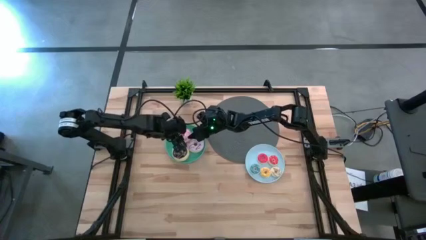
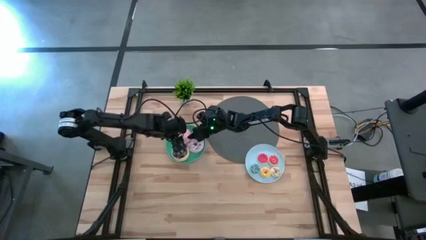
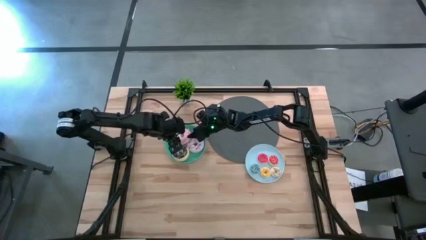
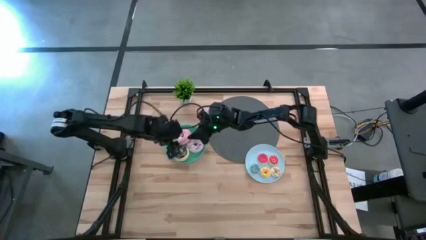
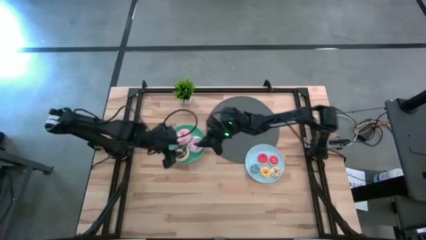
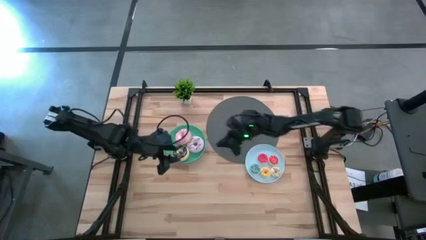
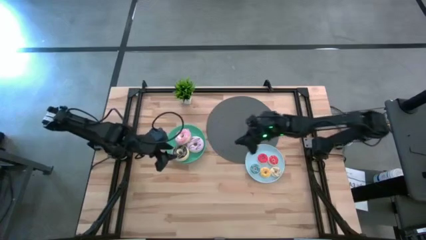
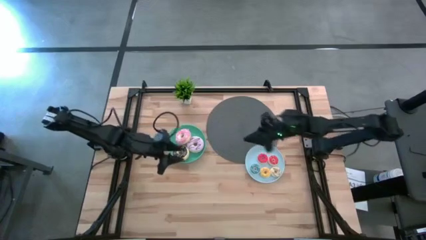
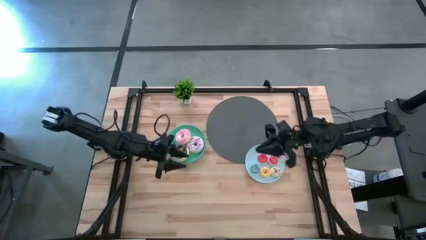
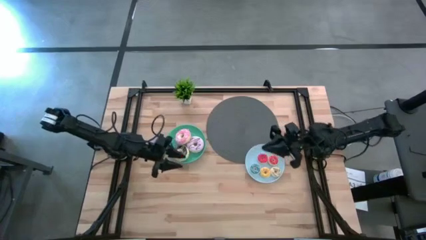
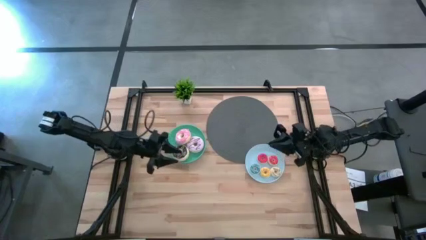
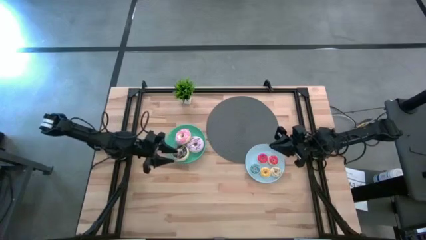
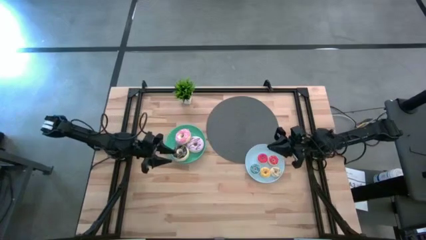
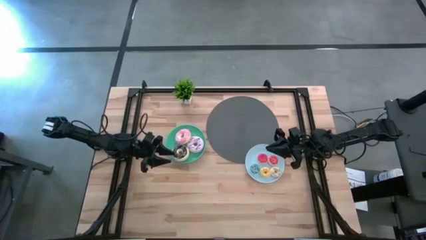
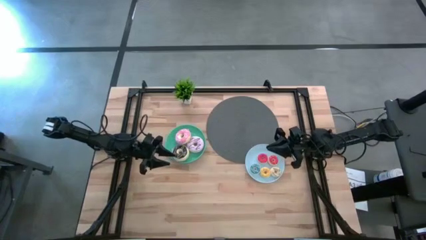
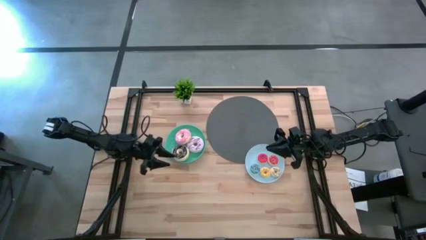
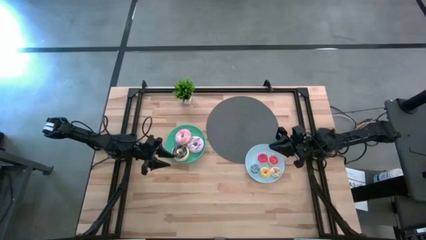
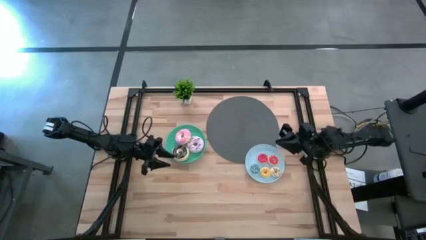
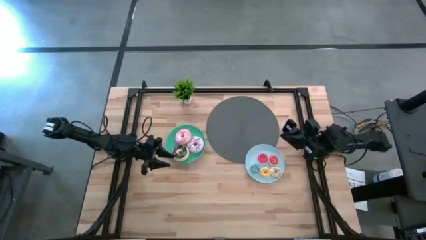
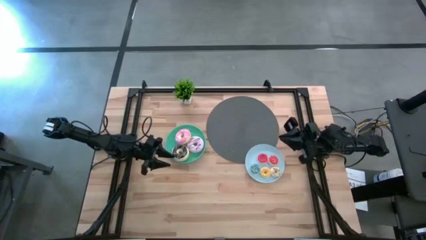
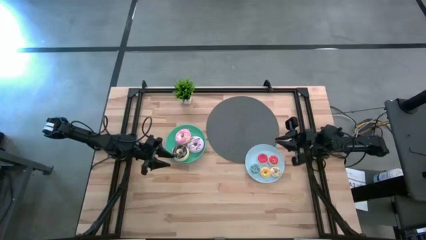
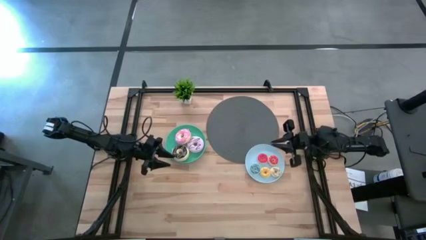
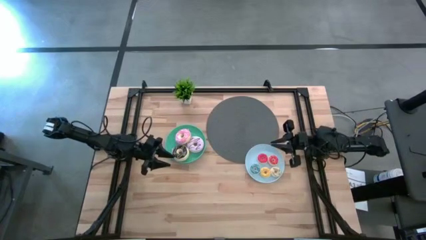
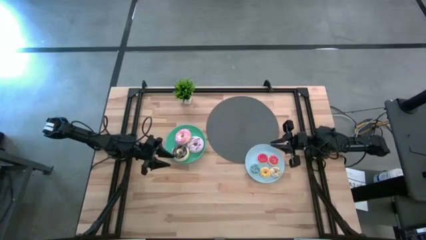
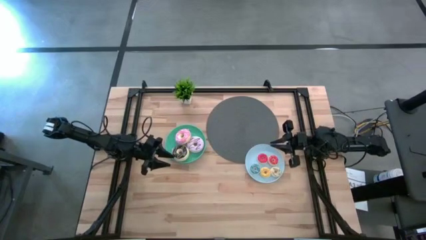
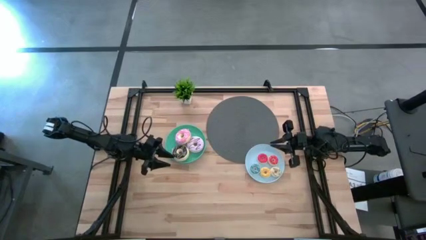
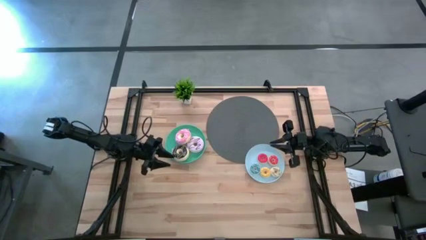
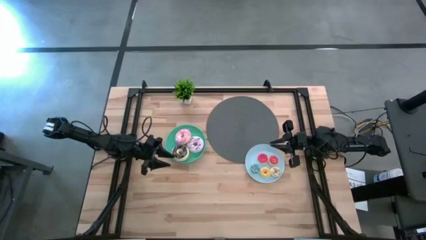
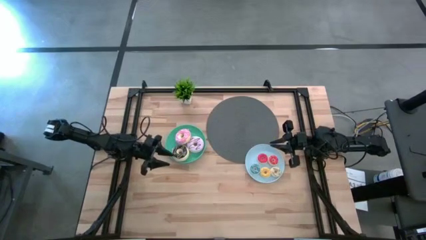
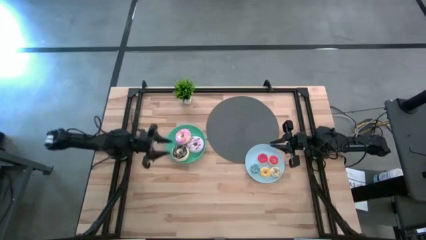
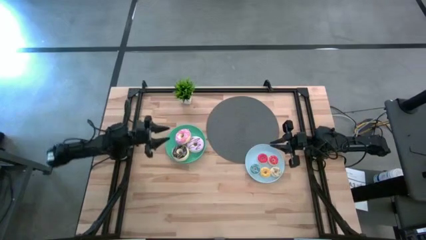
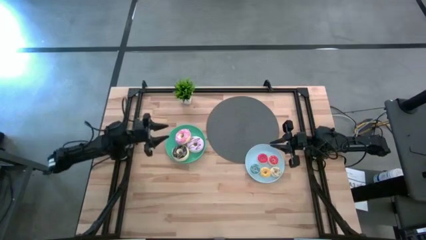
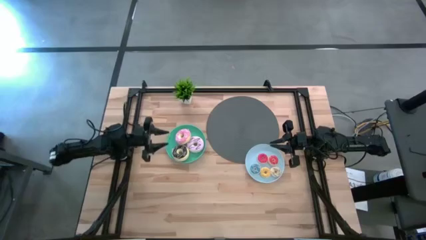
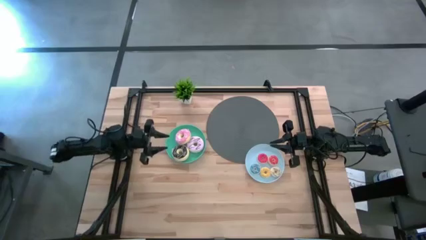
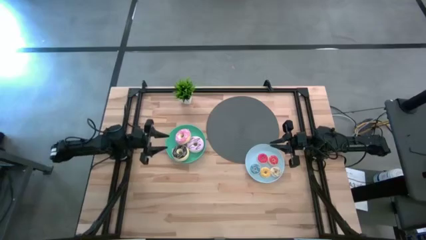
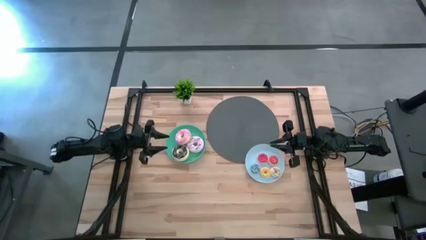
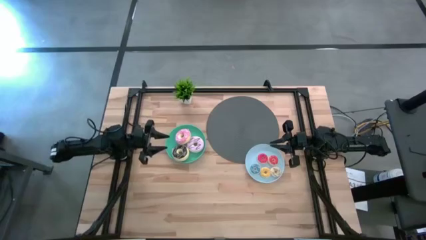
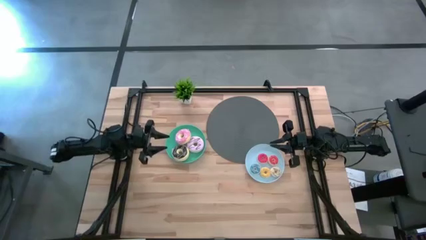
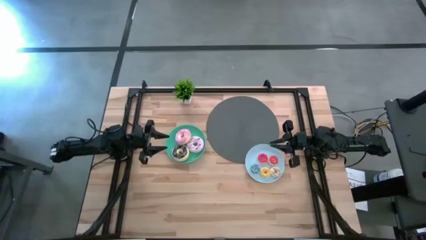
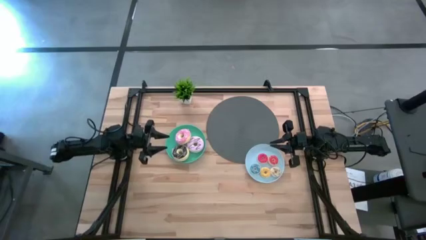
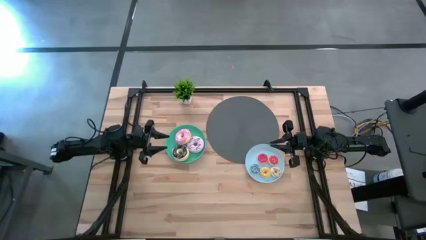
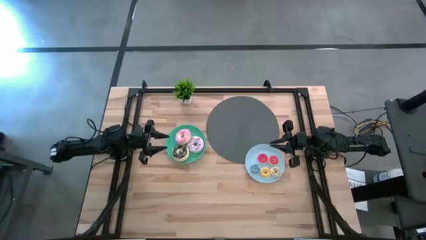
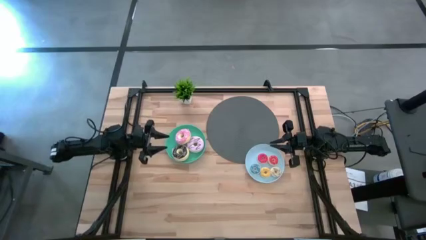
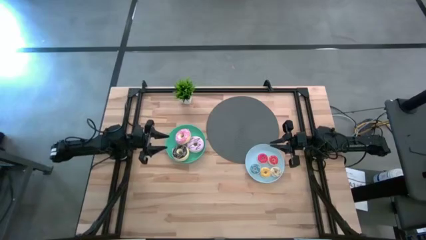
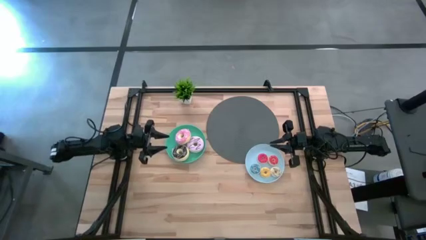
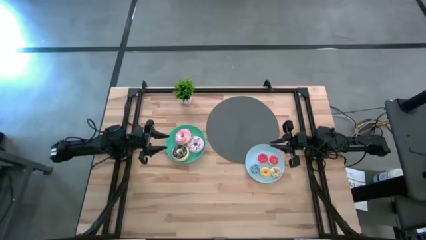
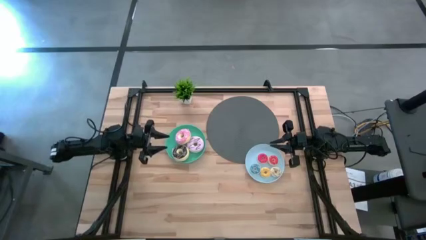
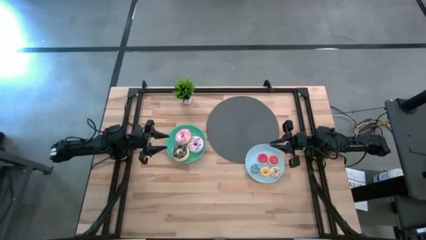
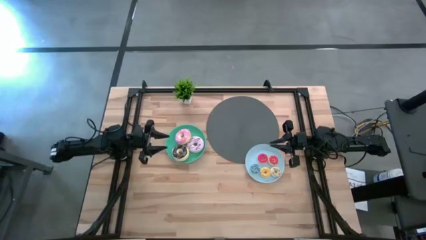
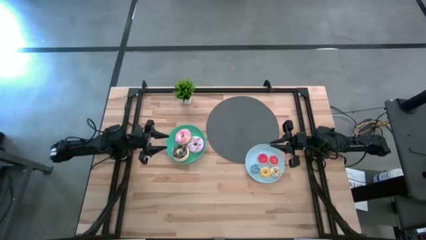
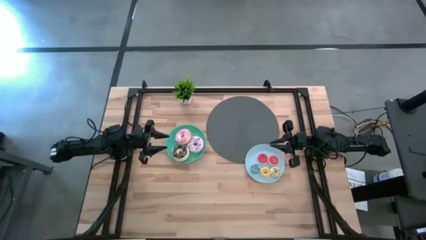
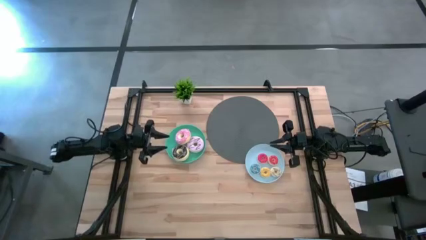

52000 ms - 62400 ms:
Task: Pick & Place donuts
Return to Home Position
